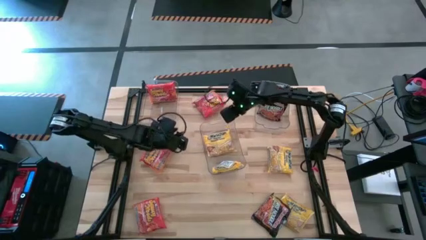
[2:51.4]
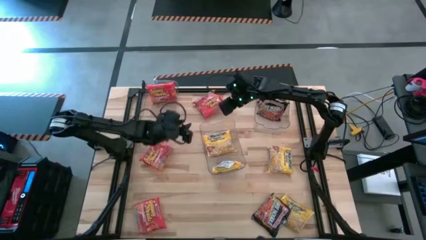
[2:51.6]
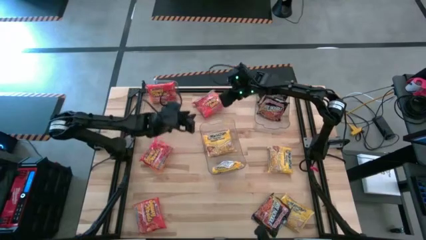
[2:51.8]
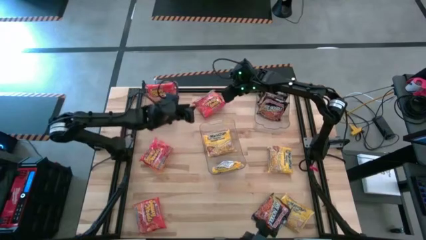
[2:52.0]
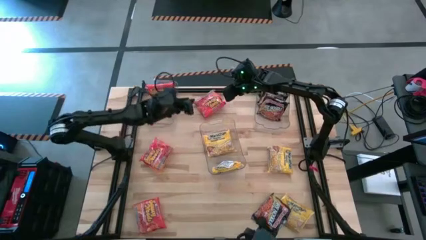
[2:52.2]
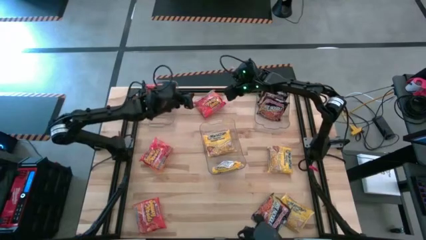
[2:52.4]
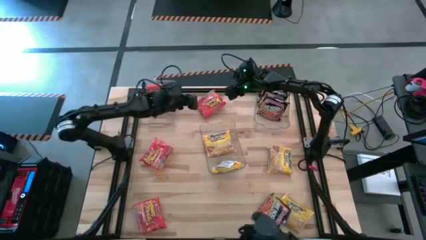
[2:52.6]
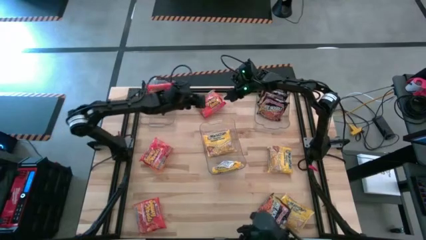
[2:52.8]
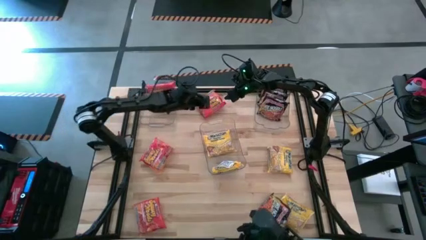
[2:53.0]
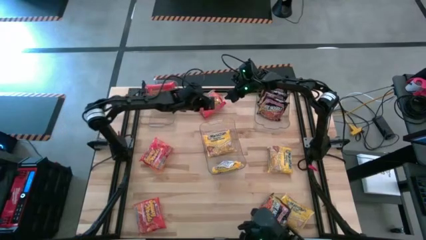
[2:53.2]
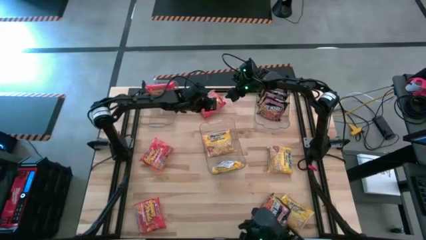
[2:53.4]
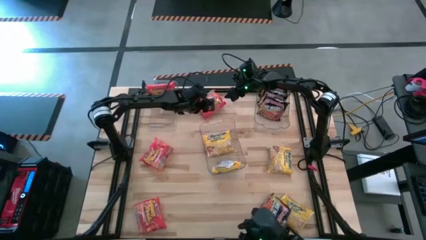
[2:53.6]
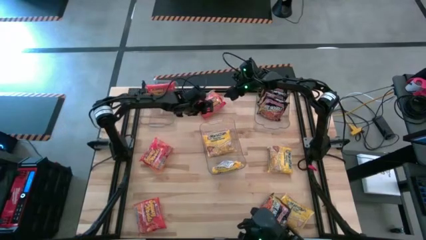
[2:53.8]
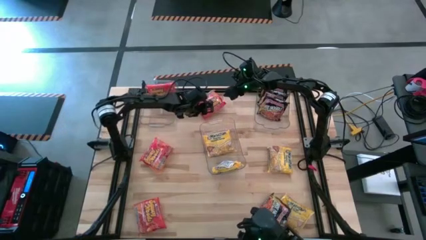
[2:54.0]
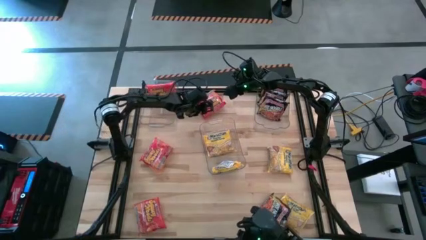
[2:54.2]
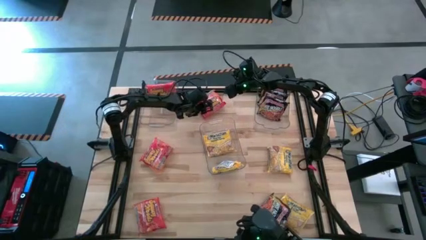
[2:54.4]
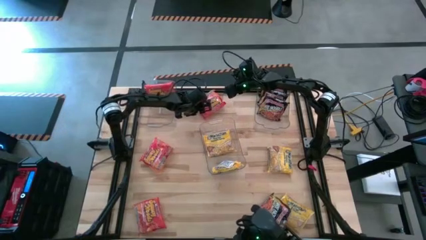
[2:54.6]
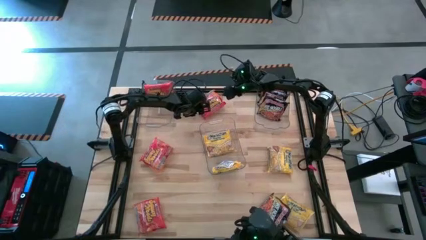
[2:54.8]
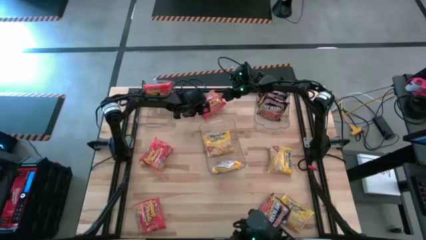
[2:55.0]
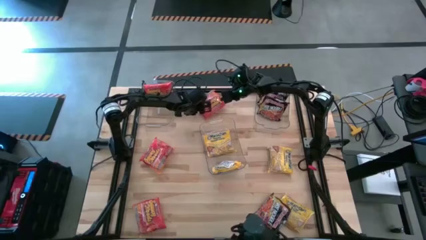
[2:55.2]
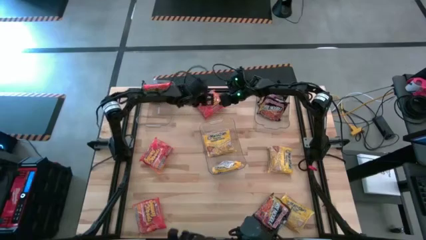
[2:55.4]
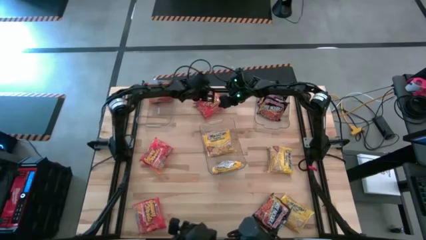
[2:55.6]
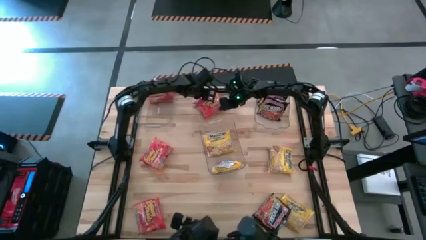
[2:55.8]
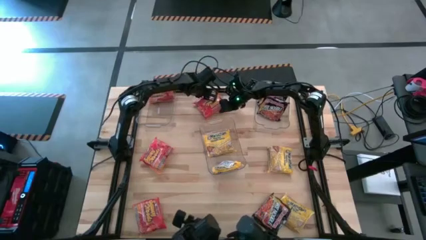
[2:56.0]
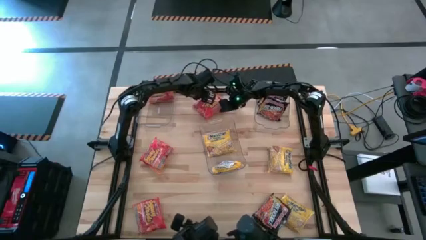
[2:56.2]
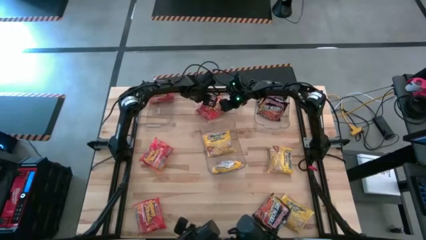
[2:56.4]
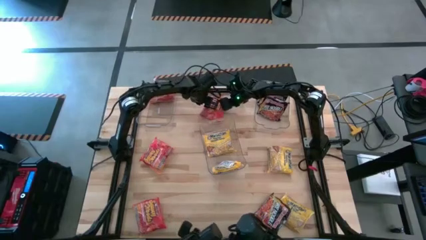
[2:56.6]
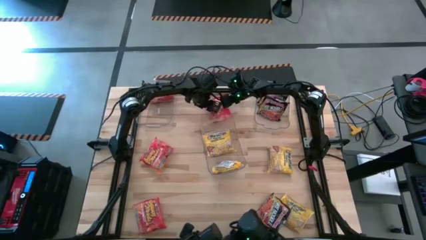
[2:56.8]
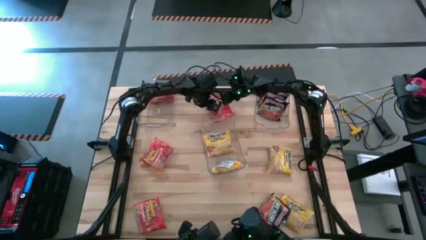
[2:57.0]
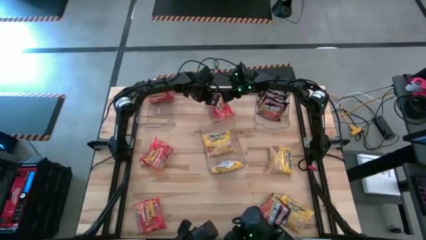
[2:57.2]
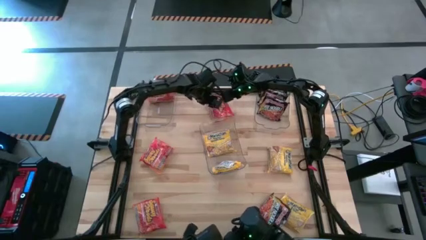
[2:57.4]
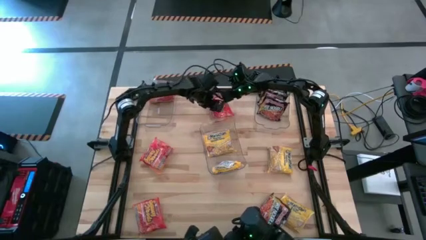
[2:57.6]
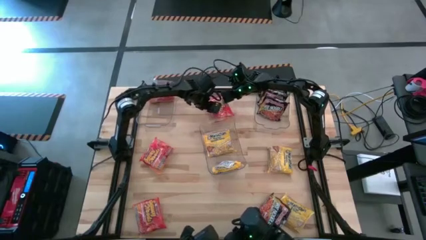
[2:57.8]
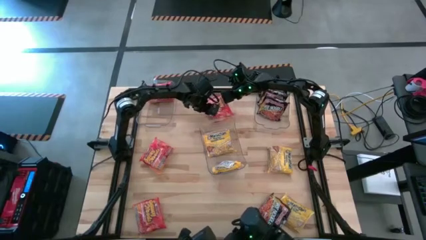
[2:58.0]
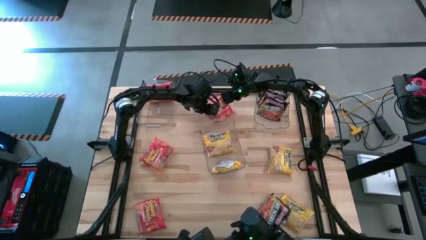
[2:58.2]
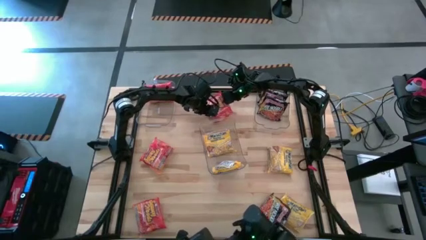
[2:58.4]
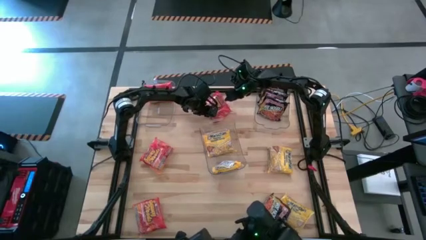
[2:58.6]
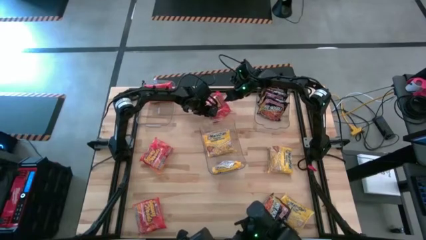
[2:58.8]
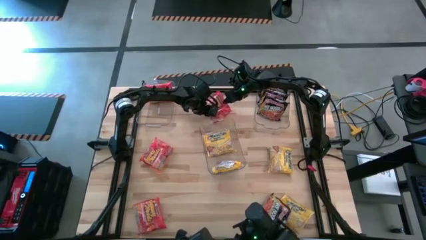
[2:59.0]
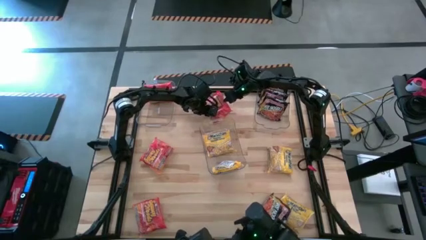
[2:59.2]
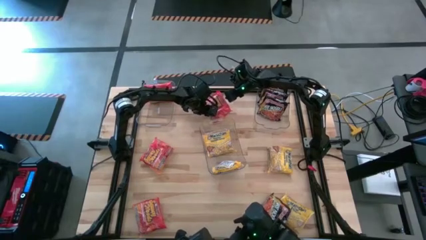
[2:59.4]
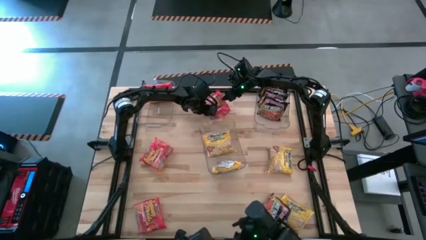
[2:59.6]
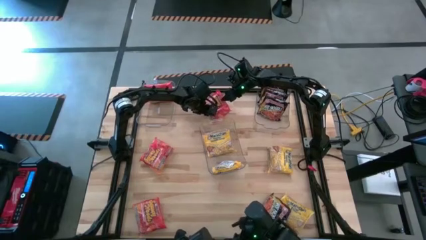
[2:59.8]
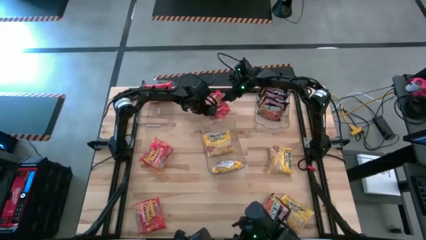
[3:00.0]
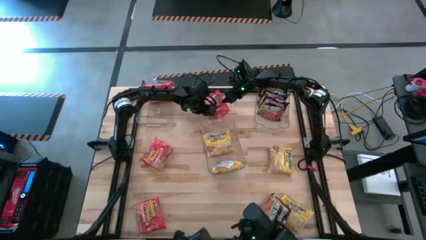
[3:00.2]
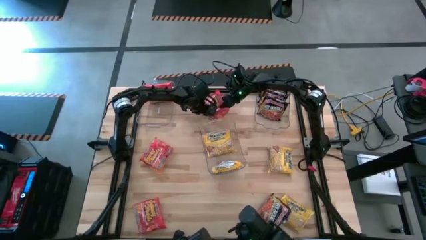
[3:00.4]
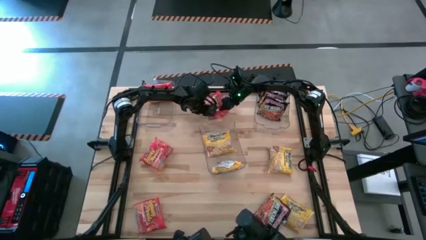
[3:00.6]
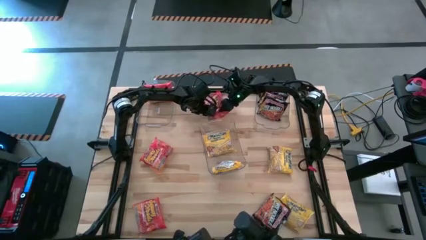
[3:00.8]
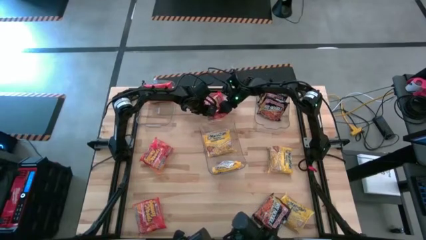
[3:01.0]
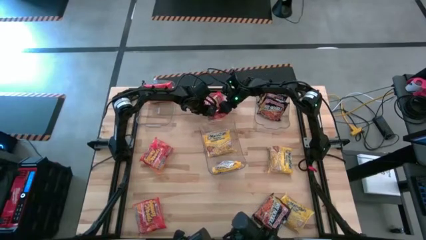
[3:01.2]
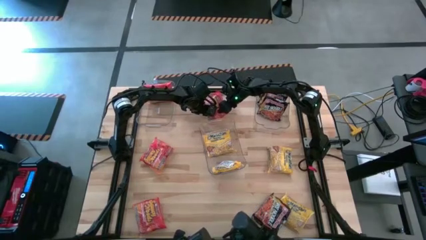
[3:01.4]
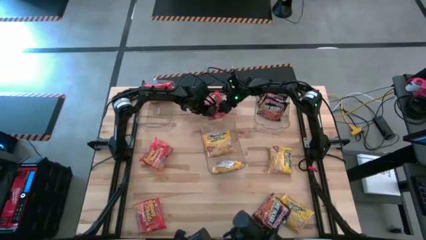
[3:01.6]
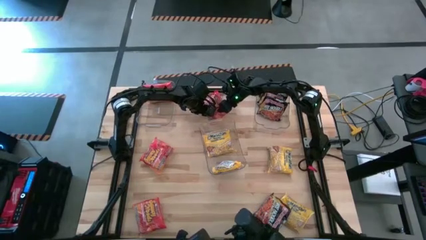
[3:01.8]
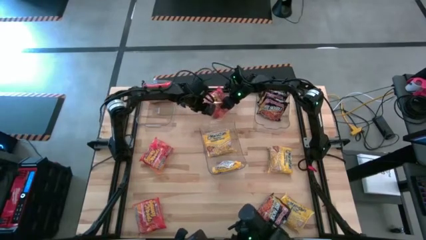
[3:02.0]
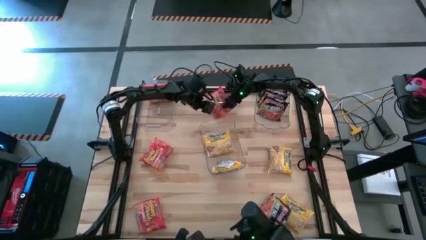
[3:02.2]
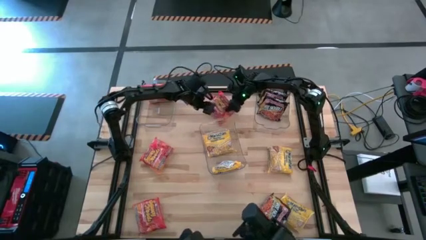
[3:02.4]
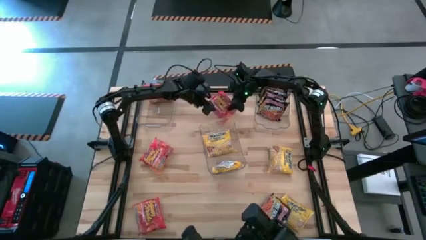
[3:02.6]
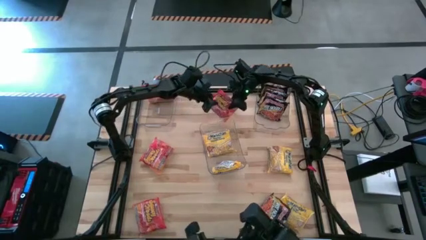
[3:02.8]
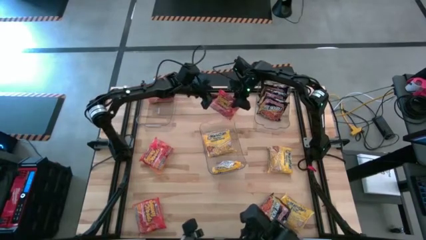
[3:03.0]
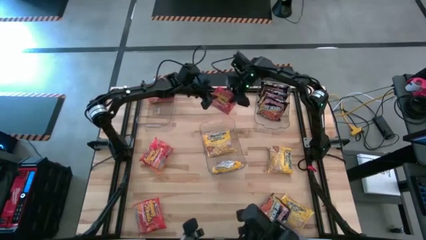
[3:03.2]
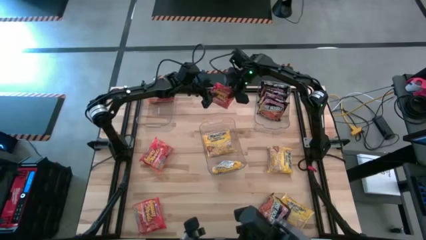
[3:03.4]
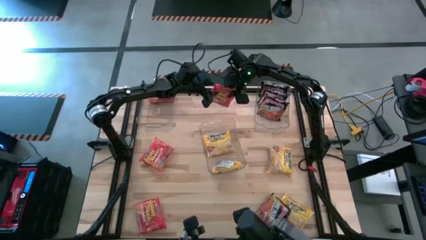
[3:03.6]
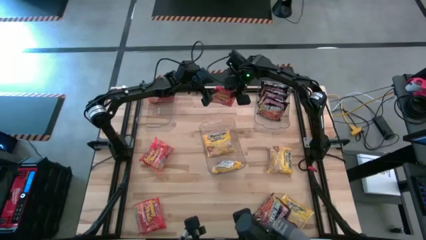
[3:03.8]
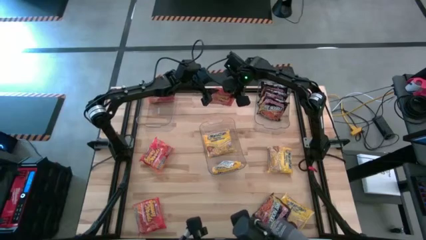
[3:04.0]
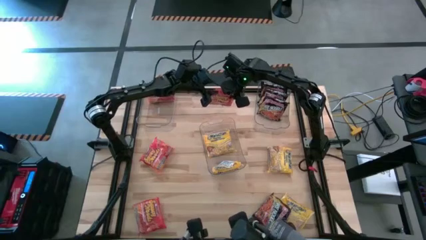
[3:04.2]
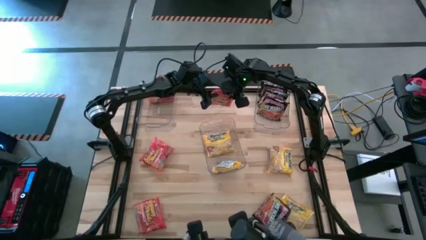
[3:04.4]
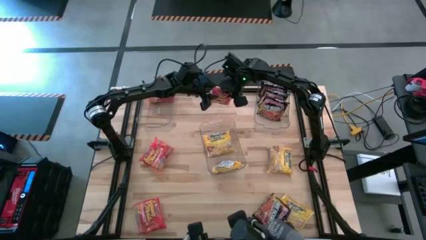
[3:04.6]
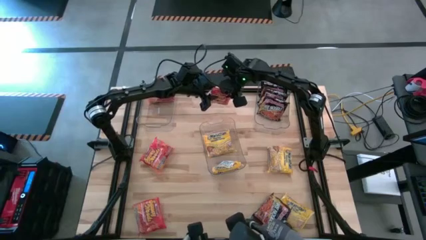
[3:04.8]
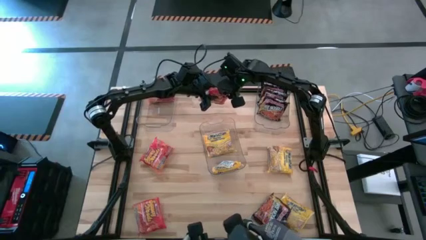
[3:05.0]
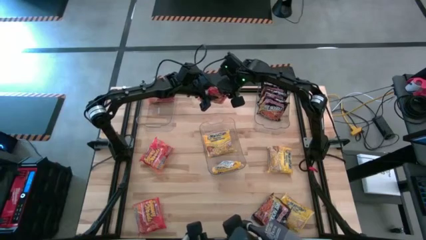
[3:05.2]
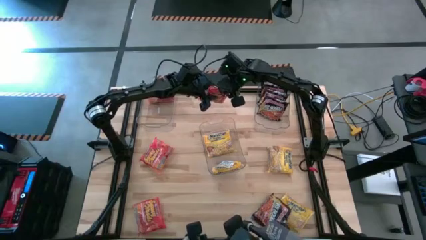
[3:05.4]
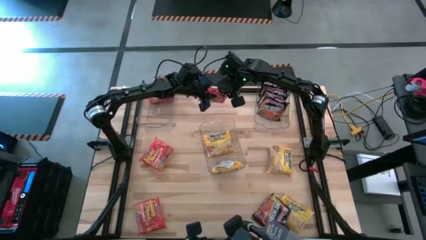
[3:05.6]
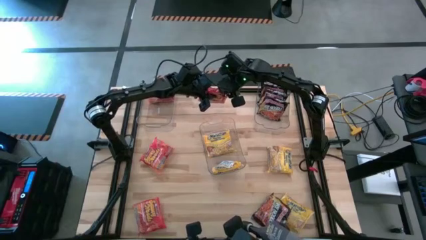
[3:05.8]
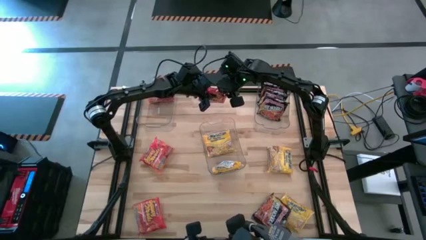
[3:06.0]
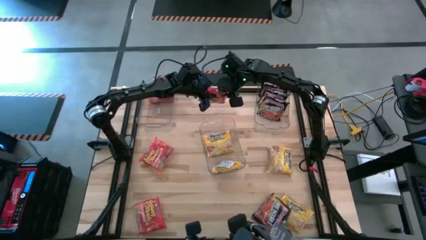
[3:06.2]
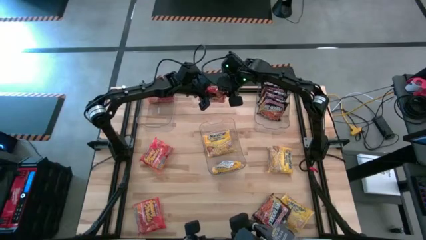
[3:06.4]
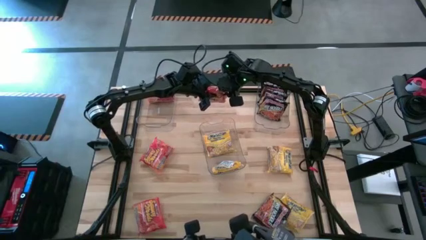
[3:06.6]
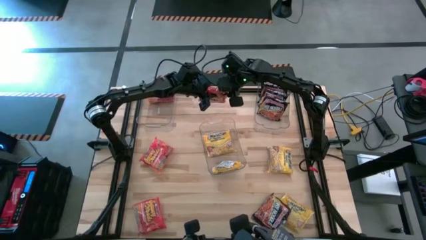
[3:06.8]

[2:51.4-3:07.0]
Task: Sort Maruchan noodles
Put the top right orange noodle pack into the top left transparent bin

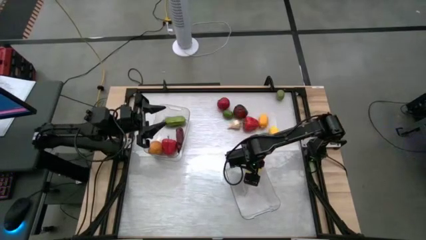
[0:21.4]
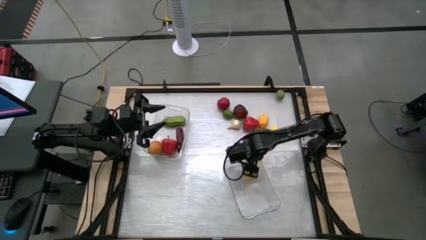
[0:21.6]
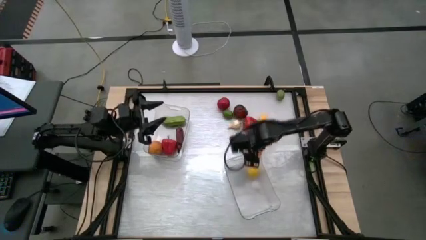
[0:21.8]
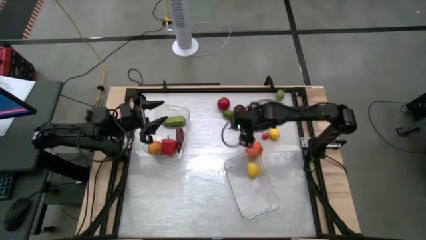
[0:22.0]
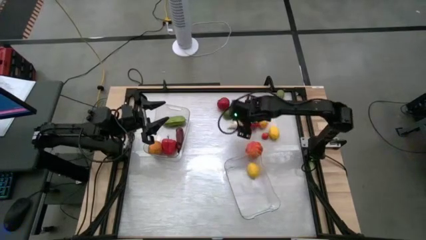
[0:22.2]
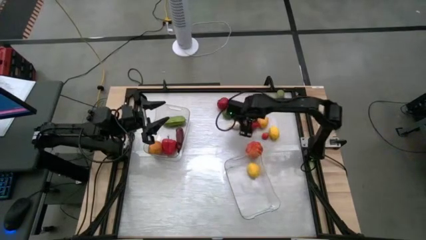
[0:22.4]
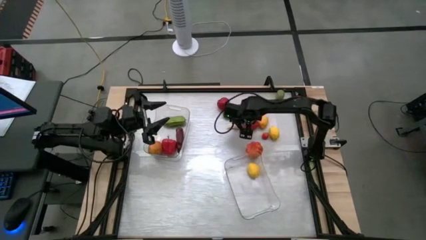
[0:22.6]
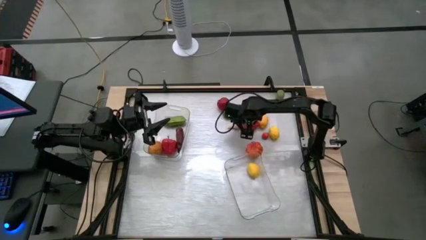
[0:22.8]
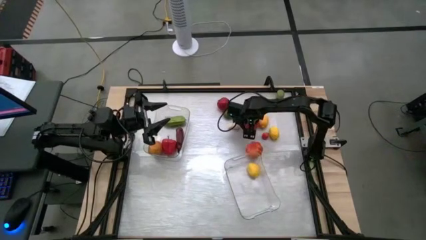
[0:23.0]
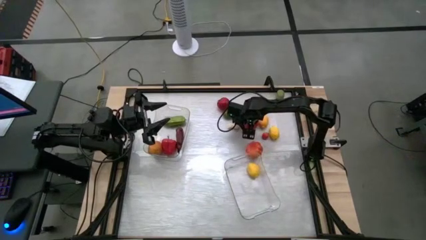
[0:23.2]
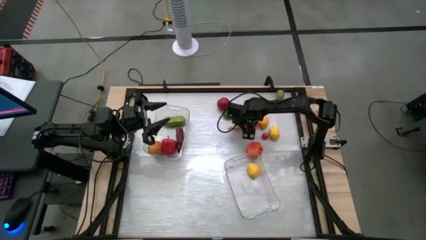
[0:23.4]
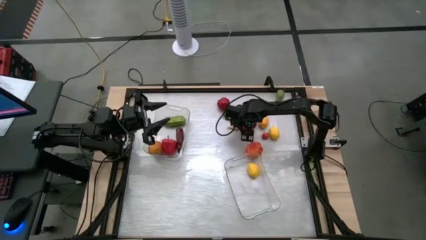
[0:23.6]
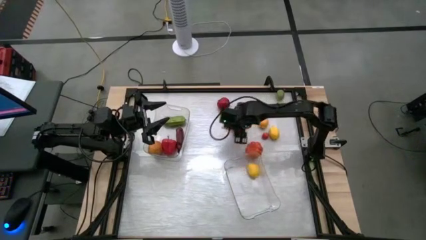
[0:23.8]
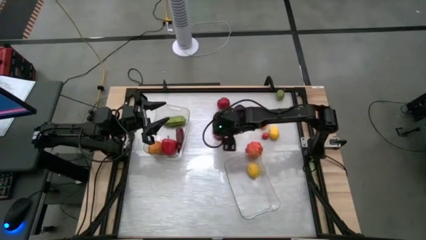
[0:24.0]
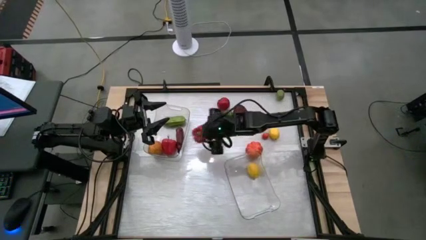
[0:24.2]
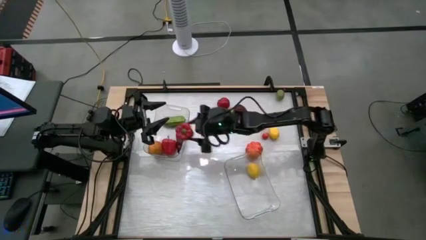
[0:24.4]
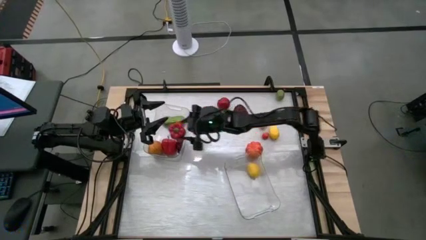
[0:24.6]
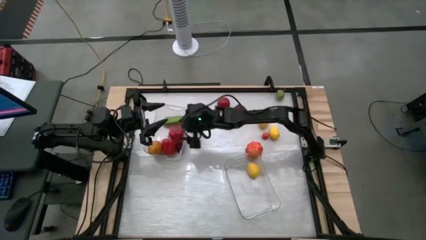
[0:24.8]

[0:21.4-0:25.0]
Task: Sort produce into baskets
Put the red bell pepper into the left transparent bin
